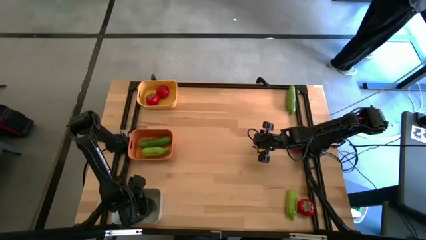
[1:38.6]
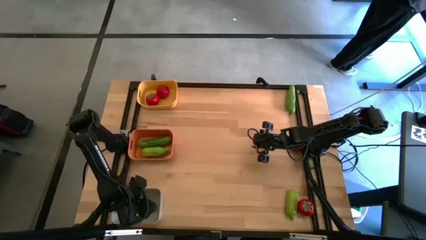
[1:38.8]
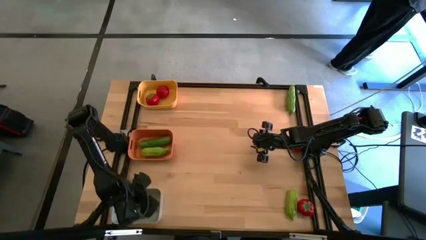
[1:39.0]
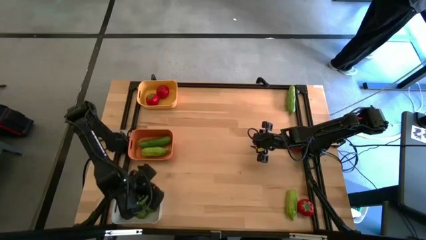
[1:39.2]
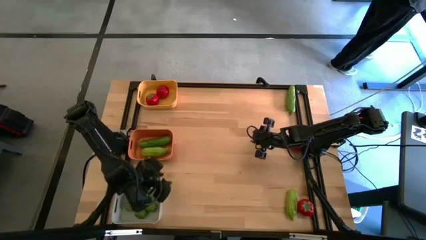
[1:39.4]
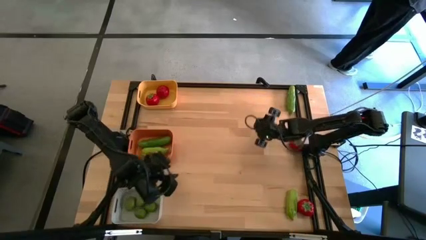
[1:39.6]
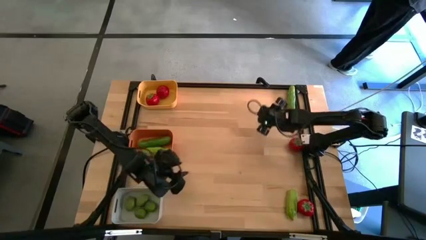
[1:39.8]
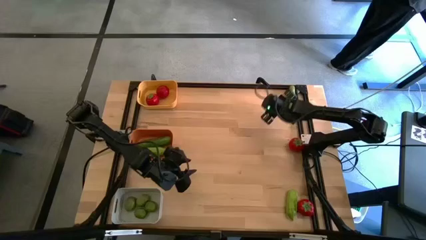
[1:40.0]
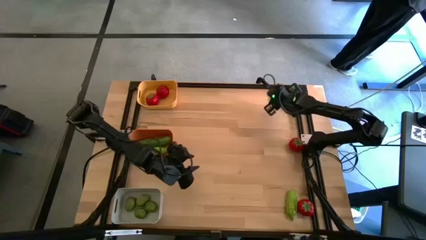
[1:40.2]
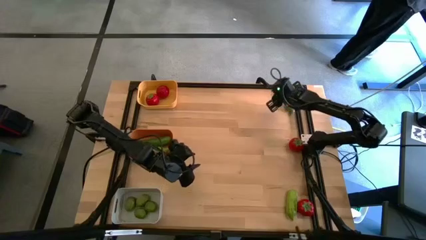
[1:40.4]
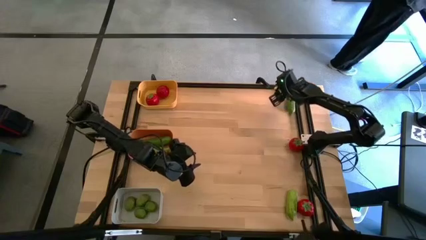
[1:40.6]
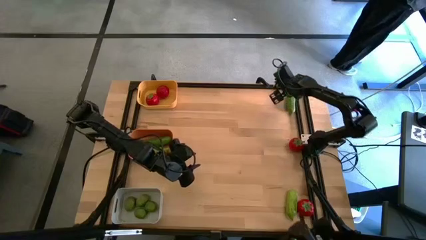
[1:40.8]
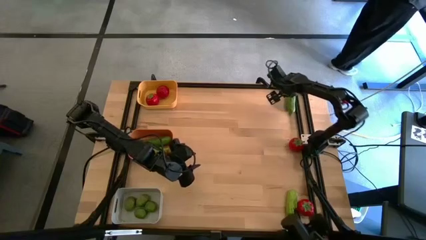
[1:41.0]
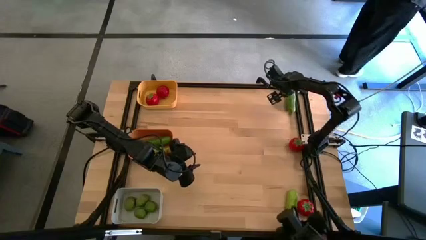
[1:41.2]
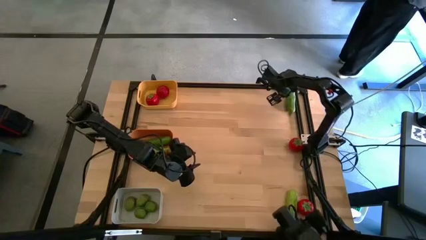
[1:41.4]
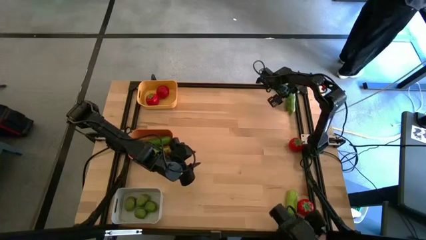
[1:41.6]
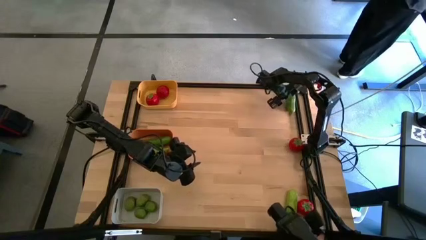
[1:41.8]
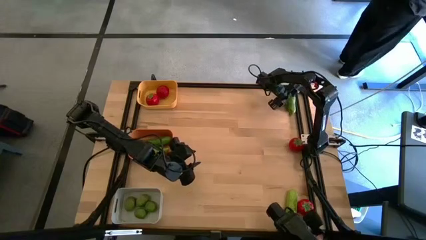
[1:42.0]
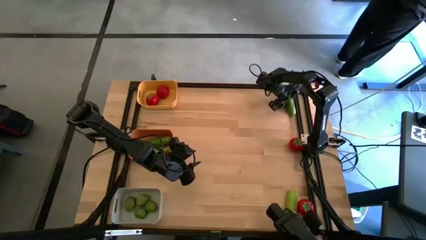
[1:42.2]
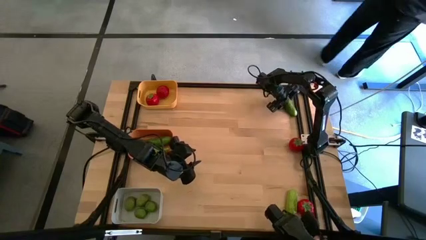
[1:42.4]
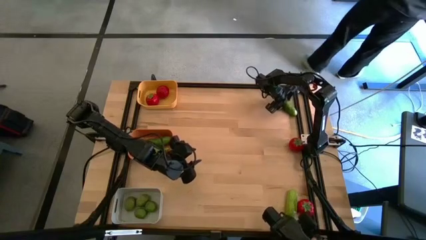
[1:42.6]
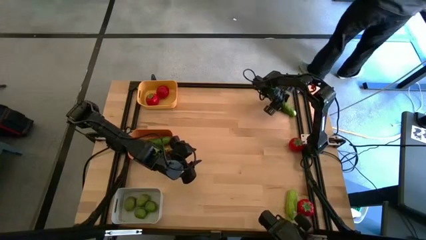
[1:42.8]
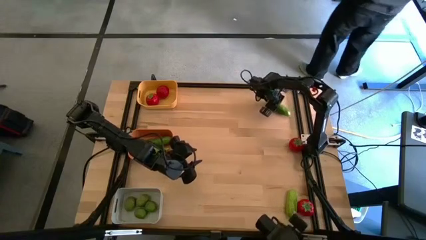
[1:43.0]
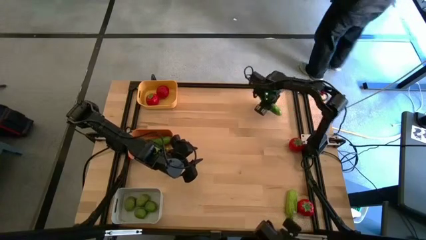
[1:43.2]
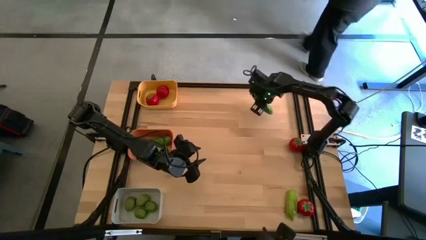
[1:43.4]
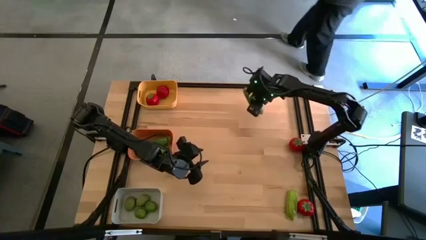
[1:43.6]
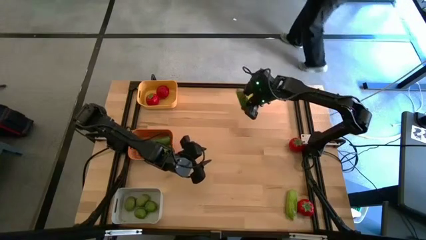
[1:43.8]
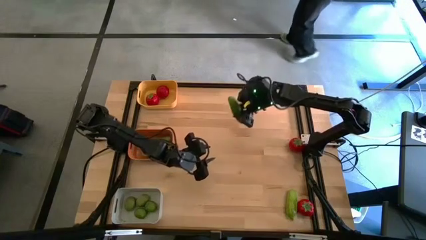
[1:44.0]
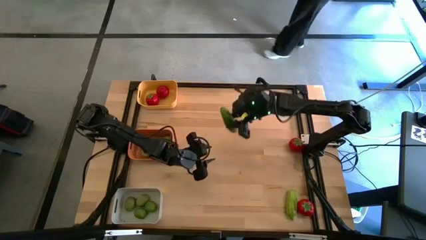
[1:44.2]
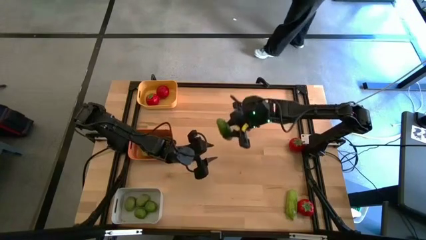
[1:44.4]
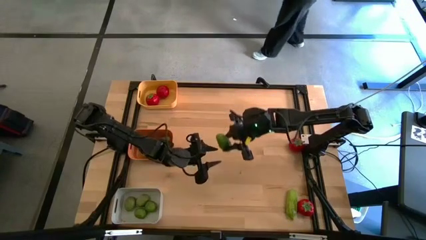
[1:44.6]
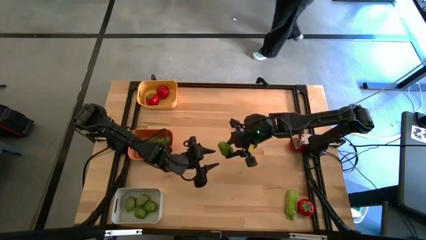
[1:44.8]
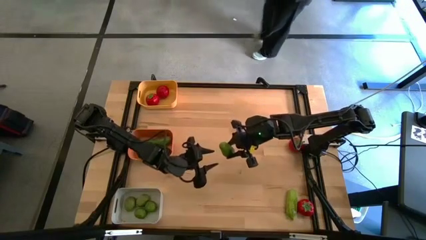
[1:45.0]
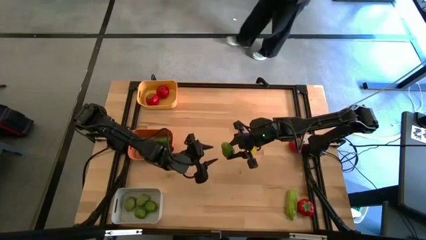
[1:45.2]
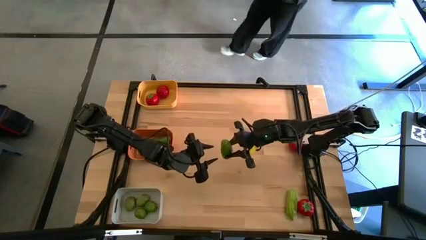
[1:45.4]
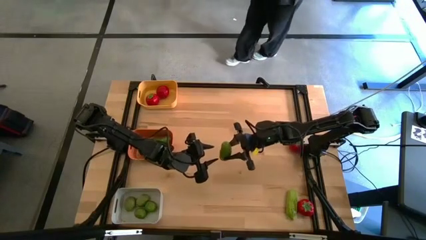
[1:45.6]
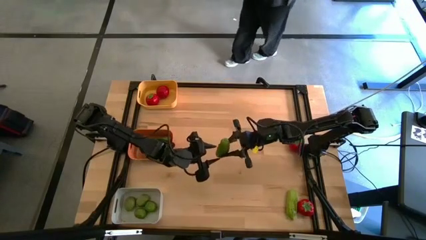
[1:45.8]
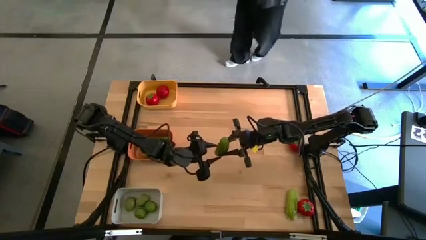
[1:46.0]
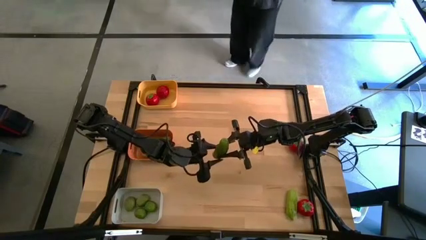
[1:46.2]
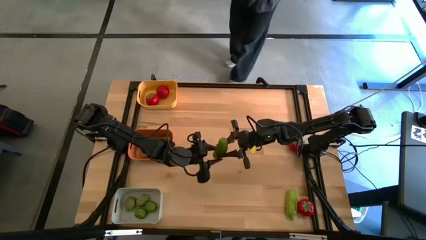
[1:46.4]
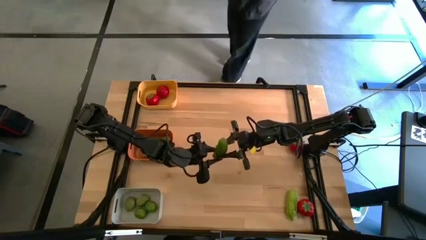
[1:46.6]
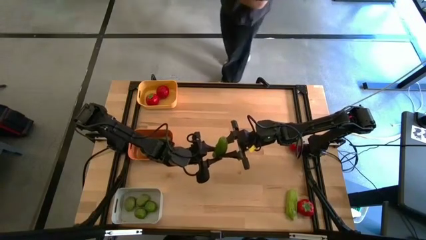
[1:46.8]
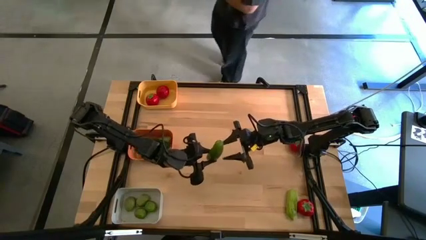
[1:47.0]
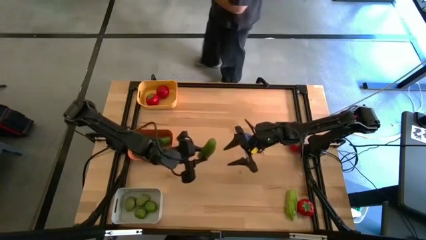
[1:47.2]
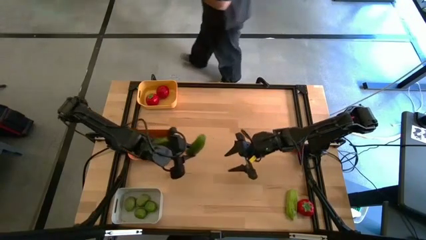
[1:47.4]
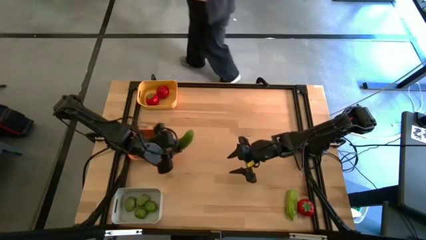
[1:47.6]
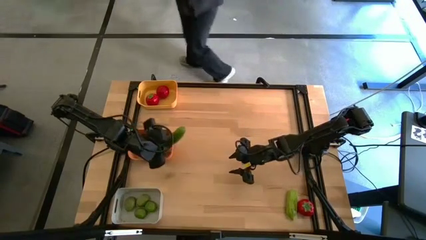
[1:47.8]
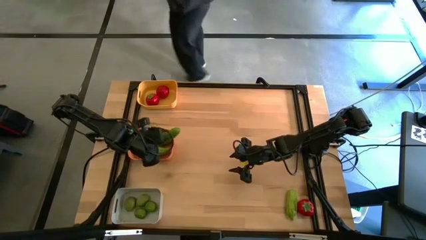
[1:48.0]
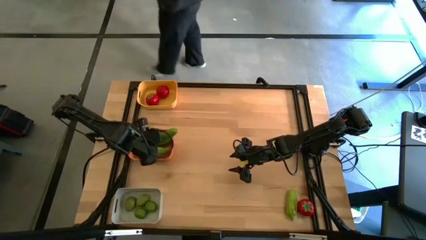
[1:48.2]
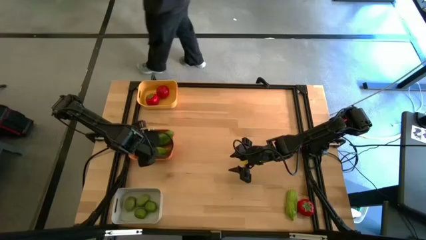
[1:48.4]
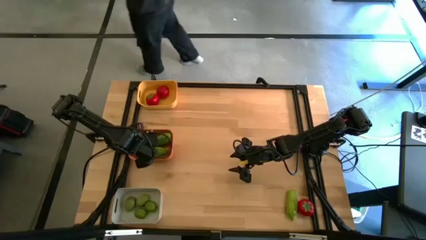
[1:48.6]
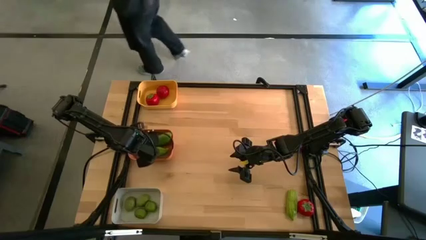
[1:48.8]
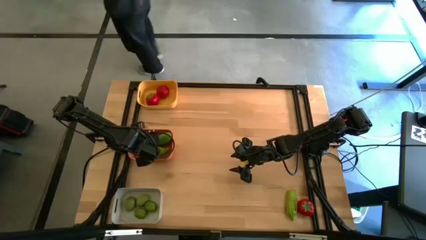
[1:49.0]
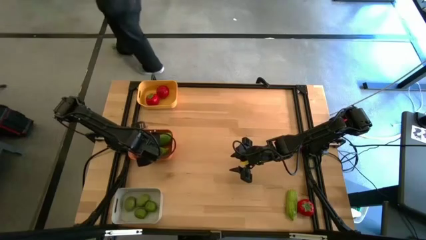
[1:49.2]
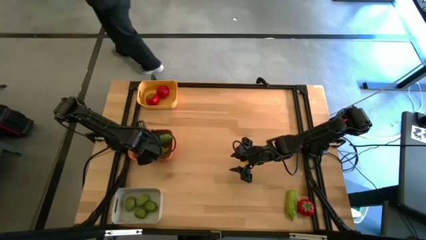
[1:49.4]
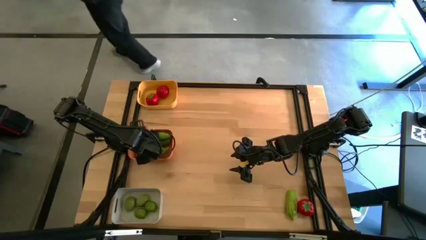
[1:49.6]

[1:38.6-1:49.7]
Task: Sort produce into baskets
Put the top cucumber into the orange bin

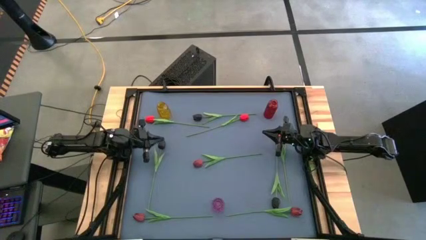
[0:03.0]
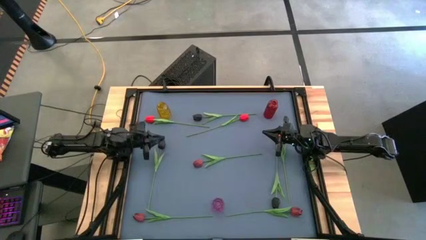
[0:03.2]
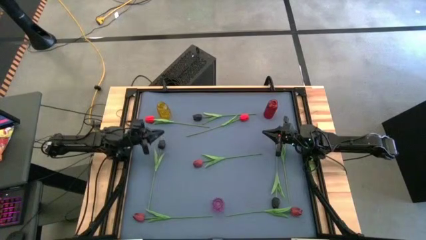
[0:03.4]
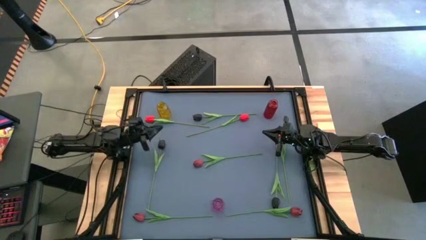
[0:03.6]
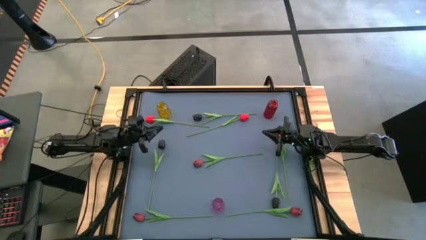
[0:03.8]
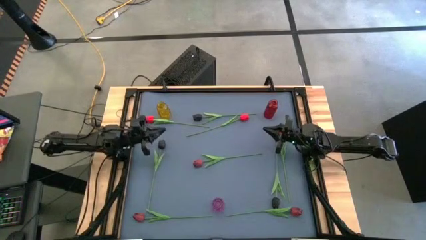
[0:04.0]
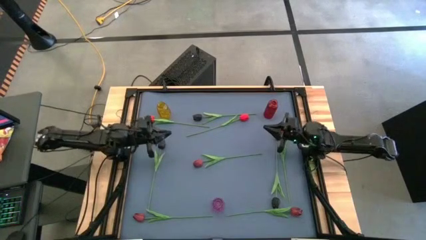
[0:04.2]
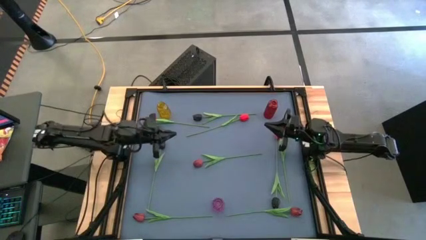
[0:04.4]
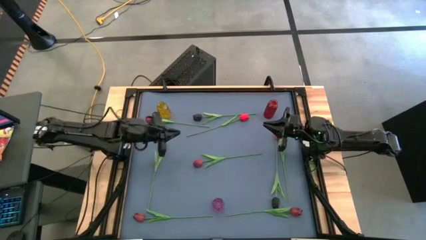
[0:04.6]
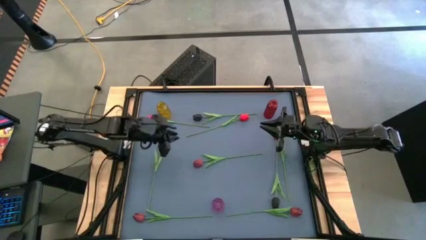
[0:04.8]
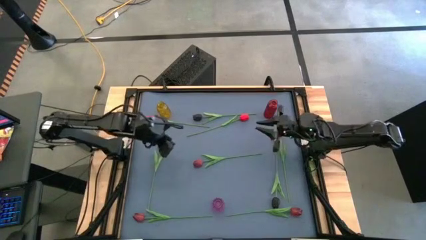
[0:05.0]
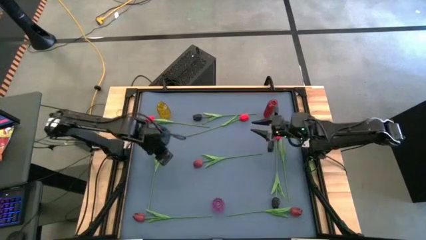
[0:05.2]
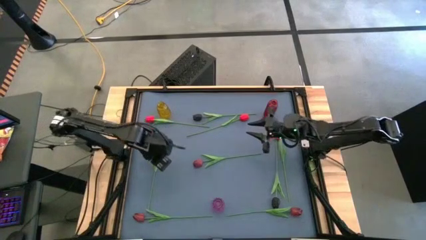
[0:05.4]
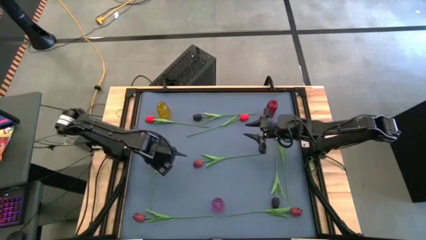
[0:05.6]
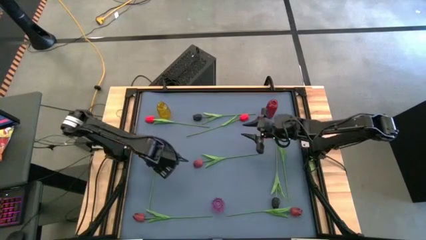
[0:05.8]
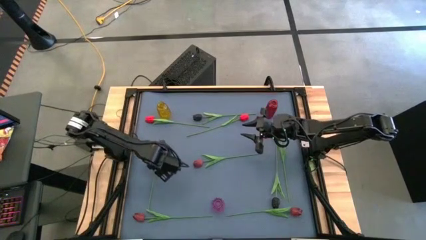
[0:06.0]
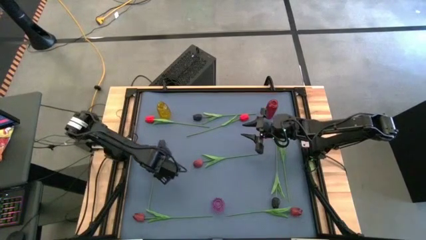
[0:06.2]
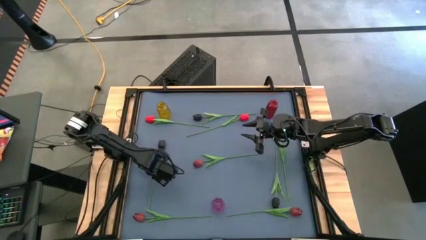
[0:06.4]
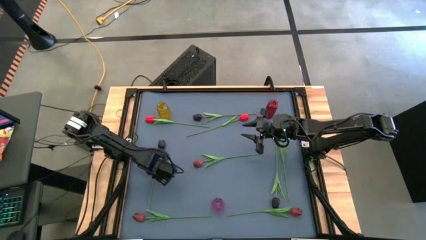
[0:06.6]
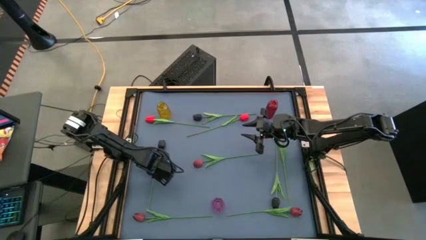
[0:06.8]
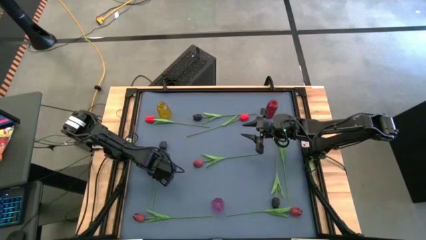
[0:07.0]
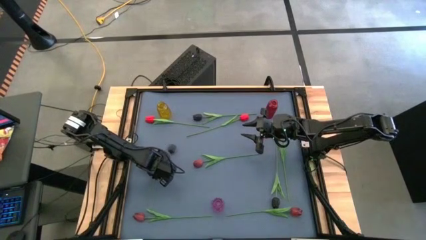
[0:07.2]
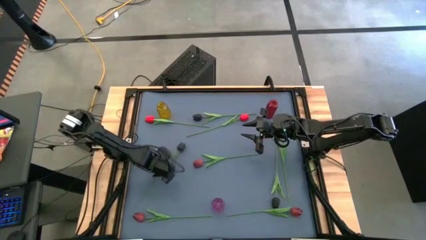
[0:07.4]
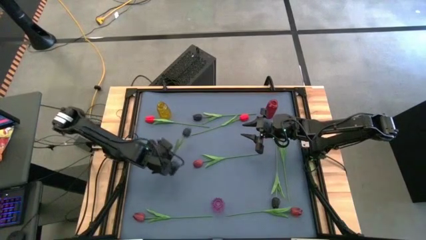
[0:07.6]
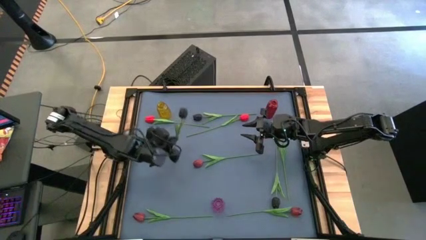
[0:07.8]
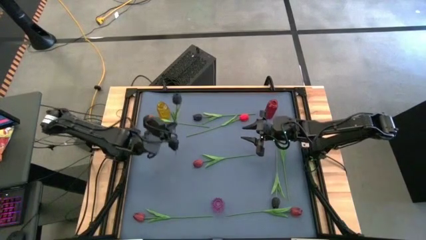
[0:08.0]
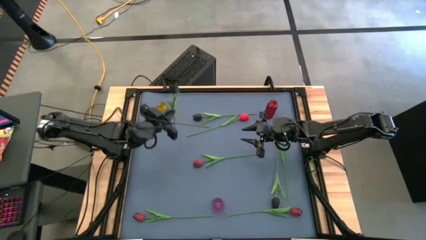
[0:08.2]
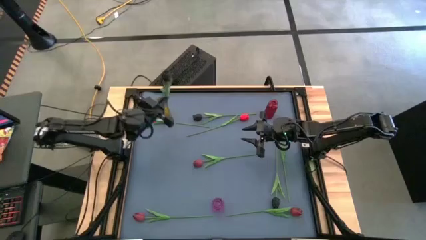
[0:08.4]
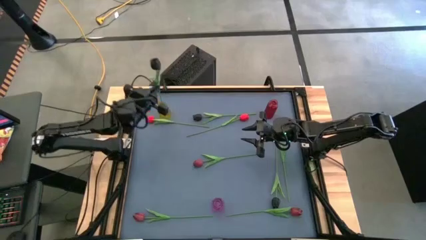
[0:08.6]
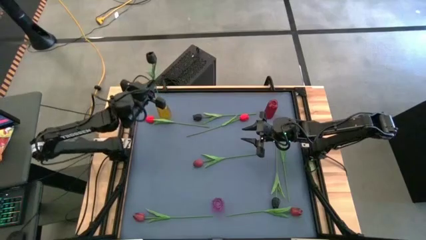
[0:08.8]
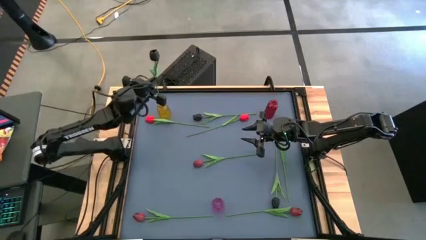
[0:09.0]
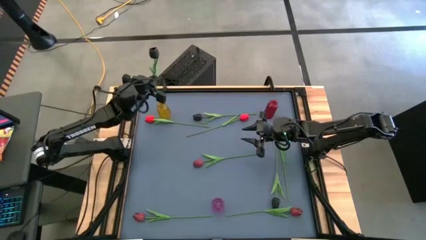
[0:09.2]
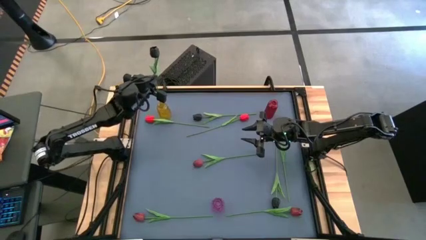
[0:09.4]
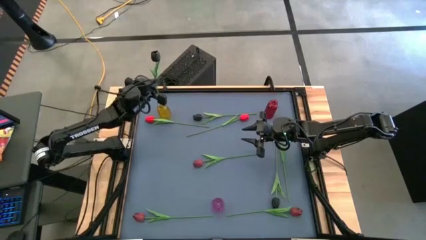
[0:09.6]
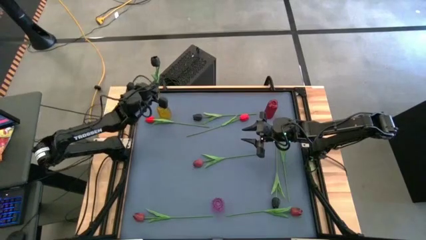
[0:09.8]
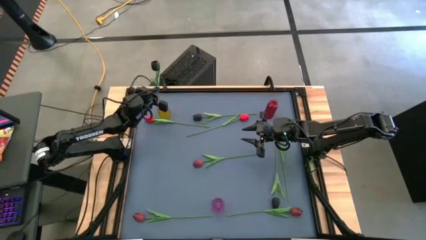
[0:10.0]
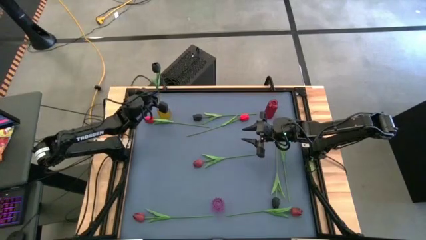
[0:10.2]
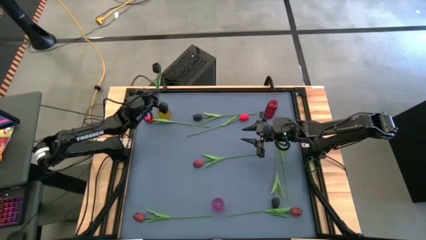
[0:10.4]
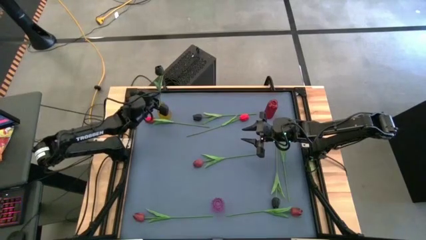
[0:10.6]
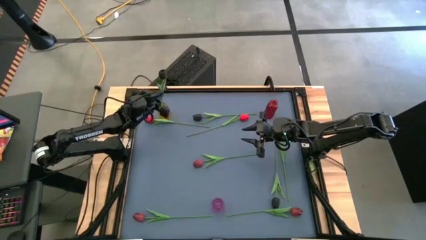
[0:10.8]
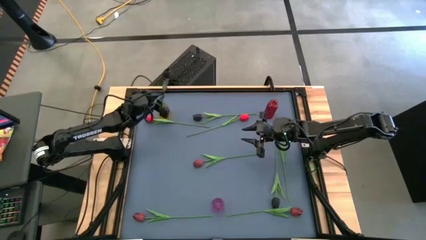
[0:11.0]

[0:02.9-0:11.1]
Task: Sort flowers into vase by color
Put the middle black flower into the yellow vase
